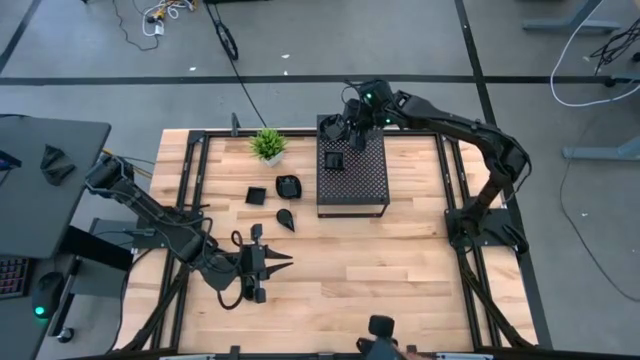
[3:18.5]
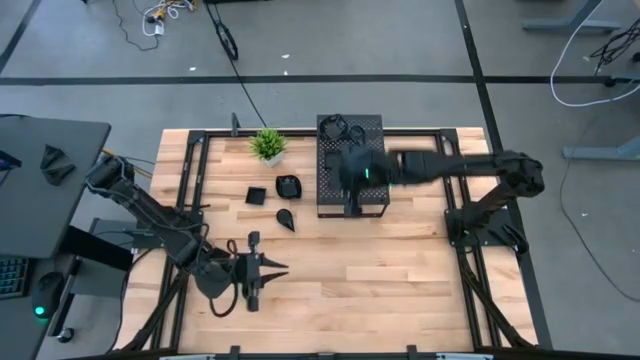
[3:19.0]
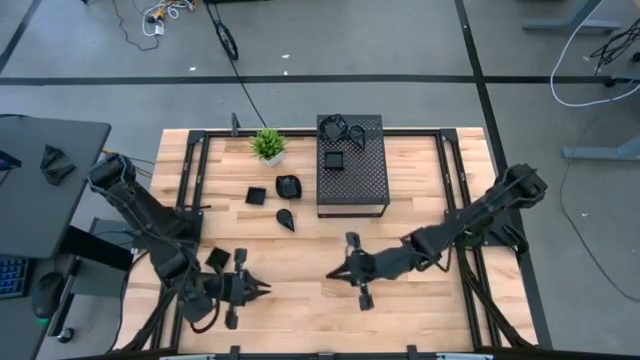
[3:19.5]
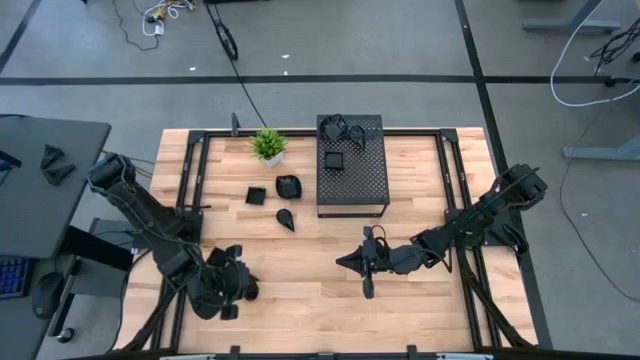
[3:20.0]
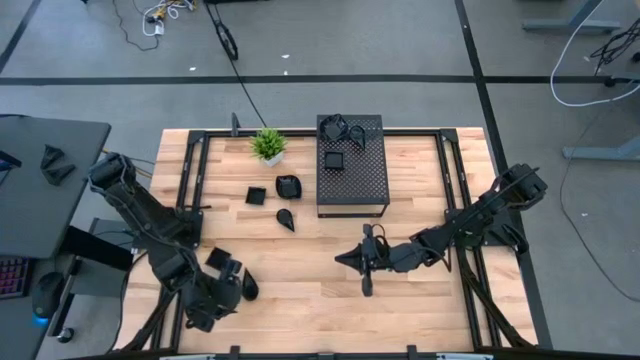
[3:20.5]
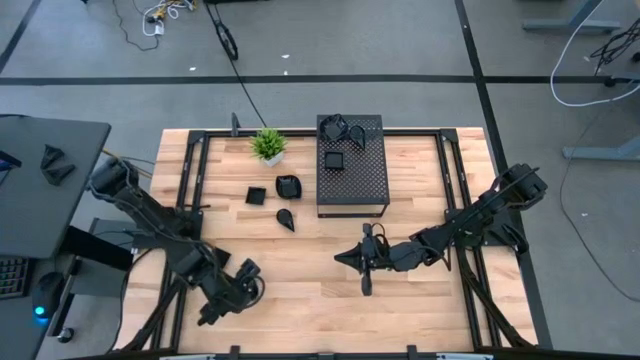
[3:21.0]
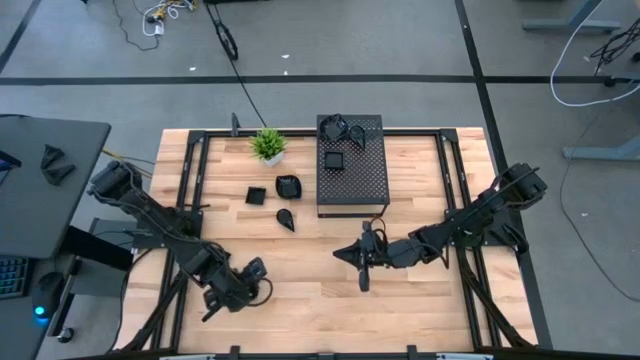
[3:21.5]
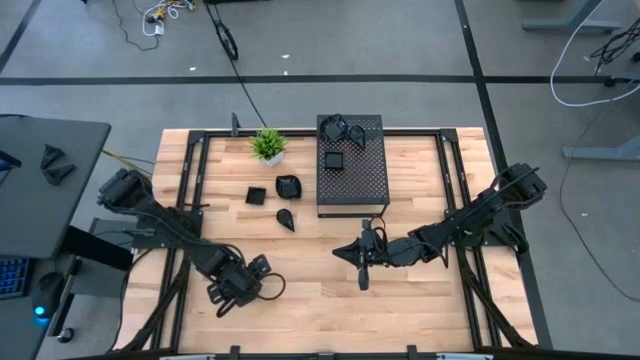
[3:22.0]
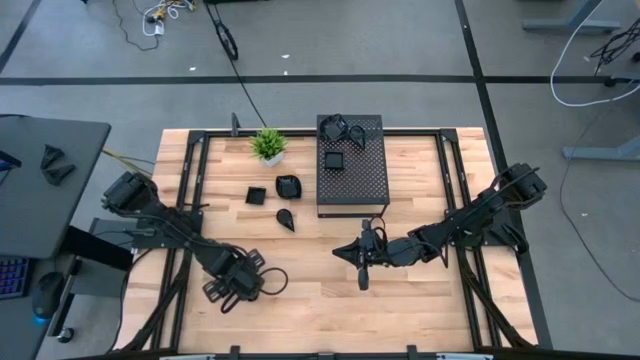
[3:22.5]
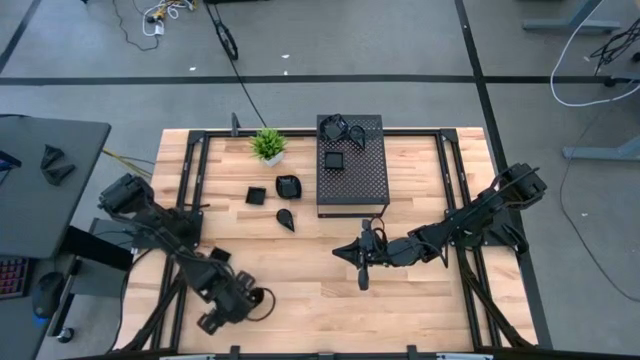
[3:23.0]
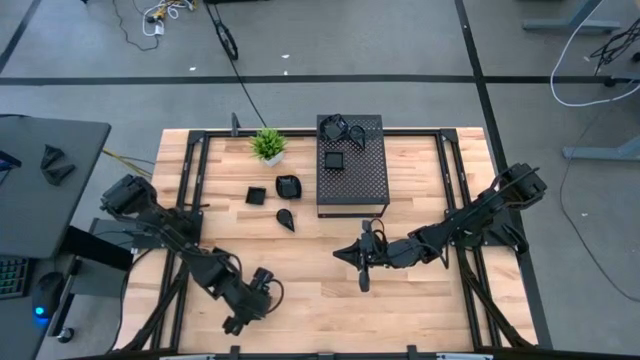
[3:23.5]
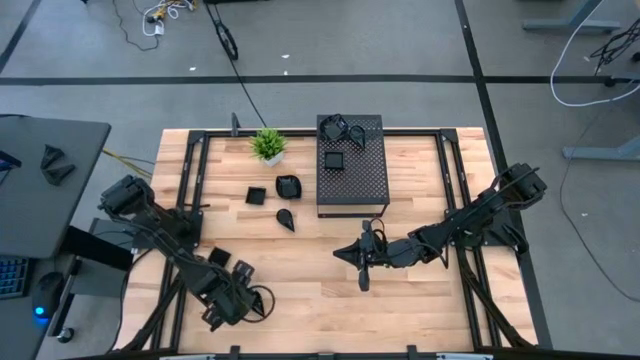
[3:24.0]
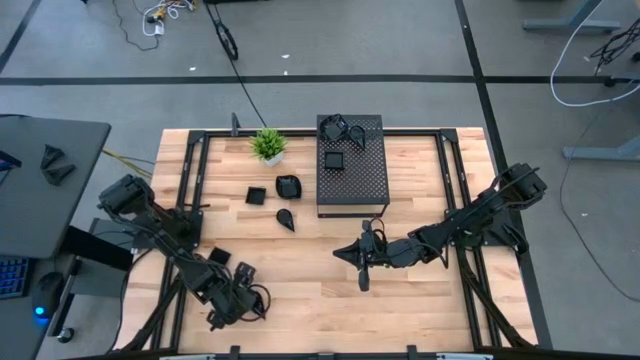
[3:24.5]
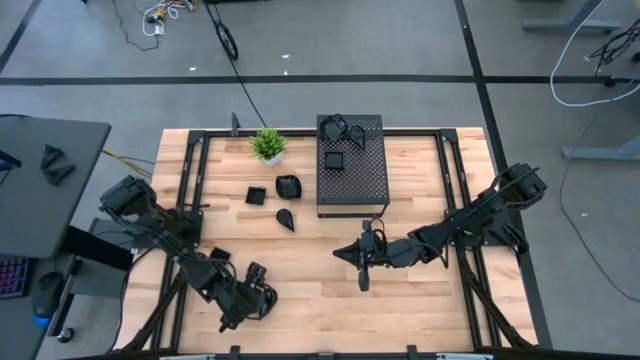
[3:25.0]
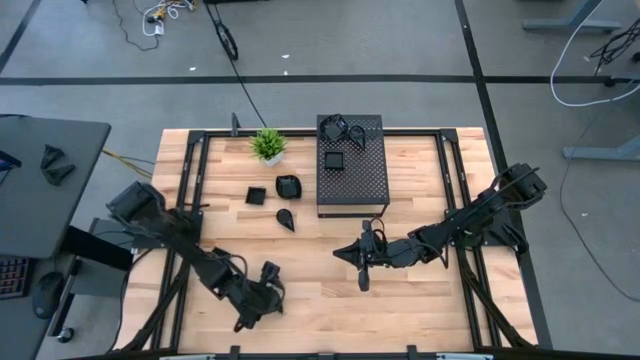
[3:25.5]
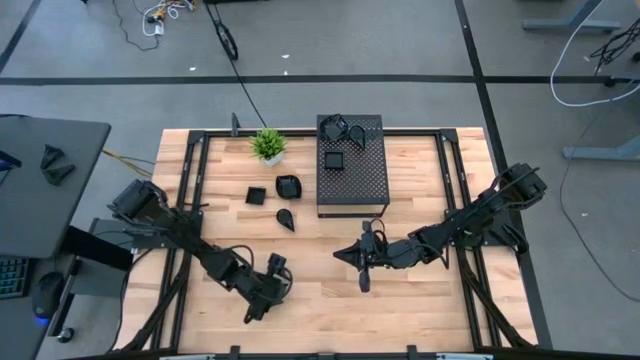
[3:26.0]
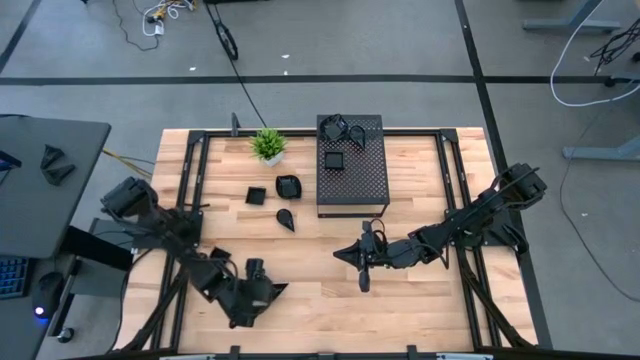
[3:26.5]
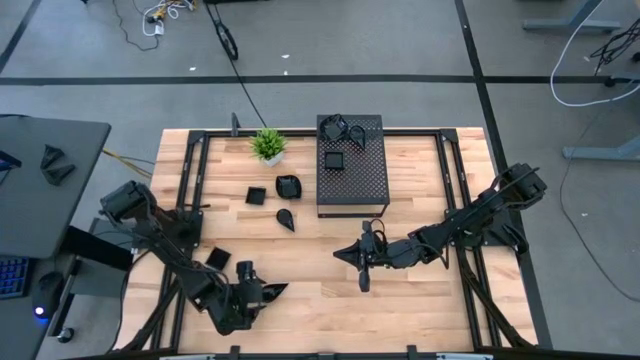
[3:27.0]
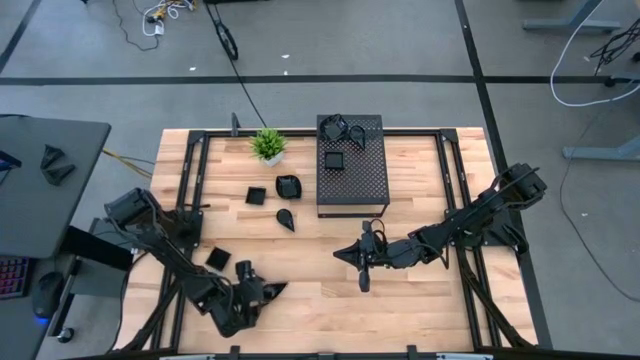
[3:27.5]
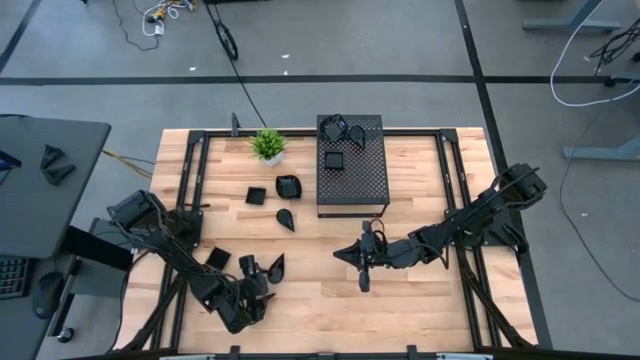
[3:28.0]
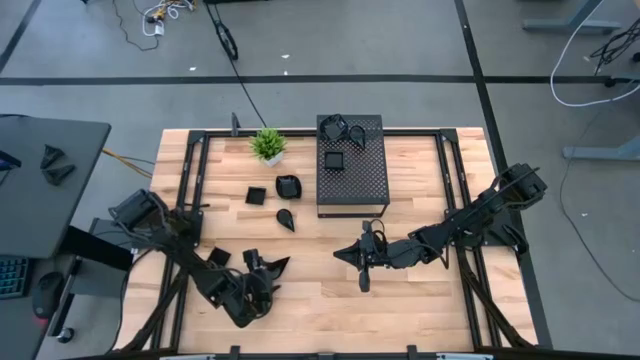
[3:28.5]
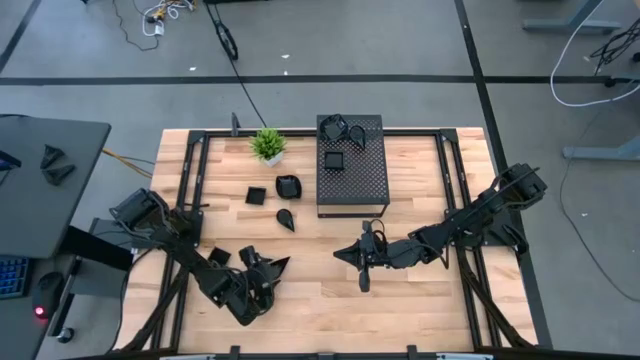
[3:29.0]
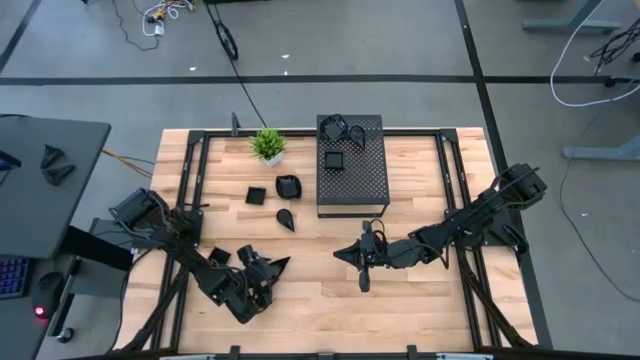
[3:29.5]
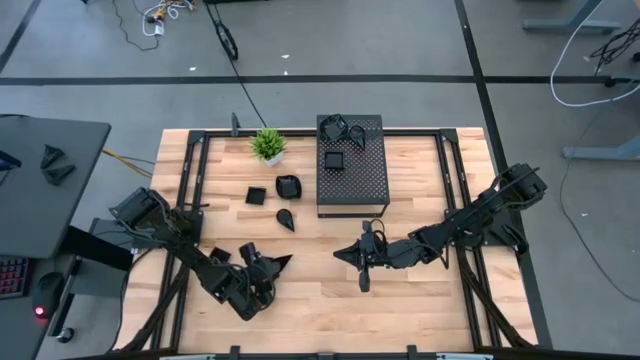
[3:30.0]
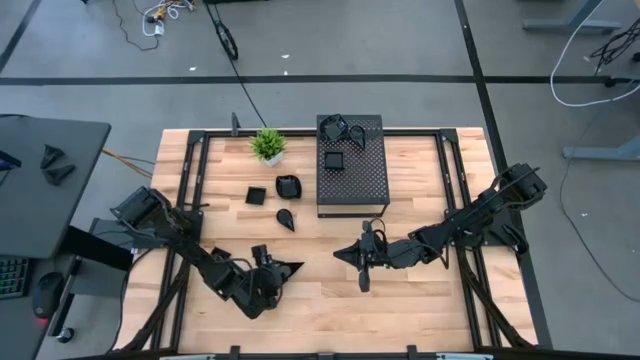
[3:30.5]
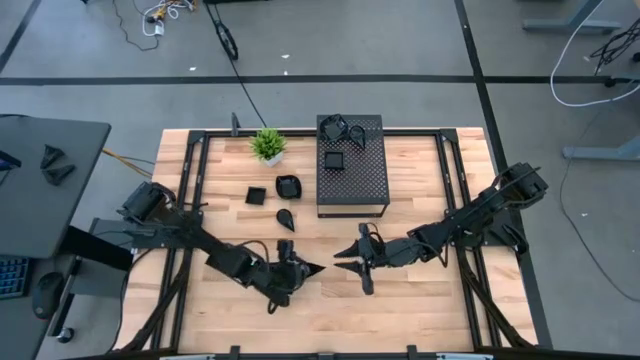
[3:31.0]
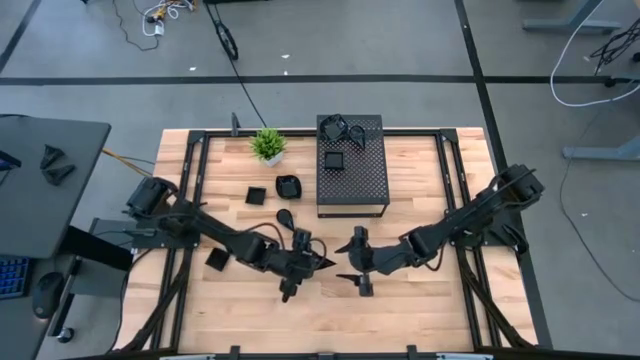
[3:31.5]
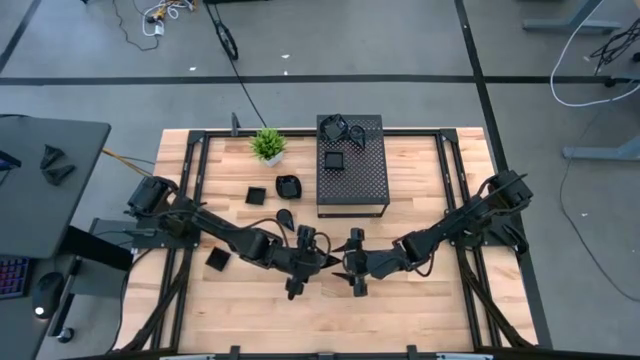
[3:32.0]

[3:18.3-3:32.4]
Task: Pick & Place Mini shaped plates
Stack the bottom drop shaped plate on top of the drop shaped plates on the shelf

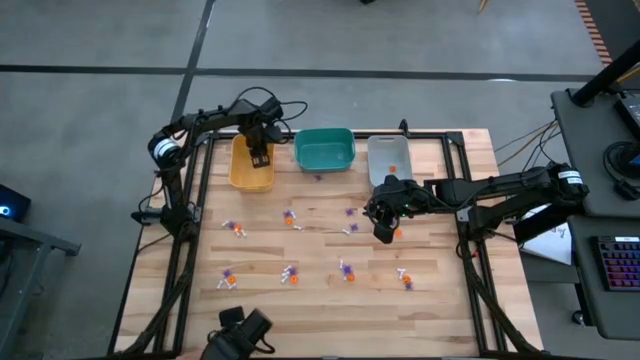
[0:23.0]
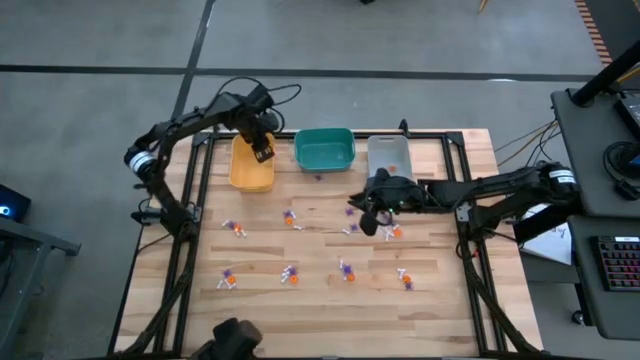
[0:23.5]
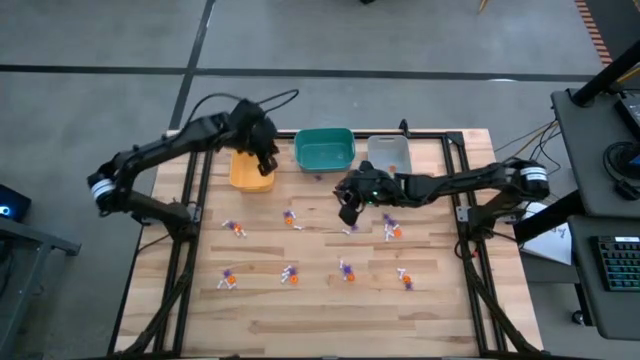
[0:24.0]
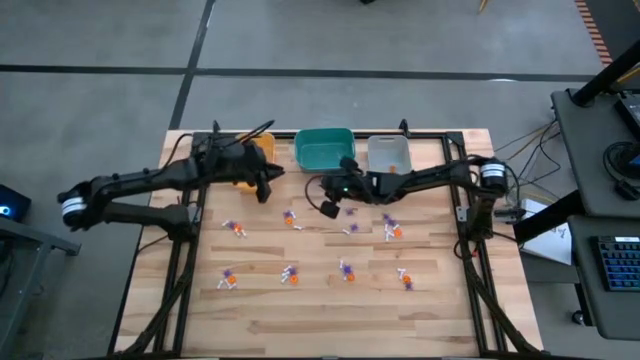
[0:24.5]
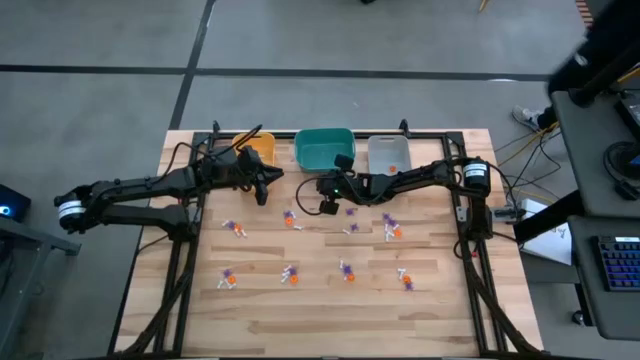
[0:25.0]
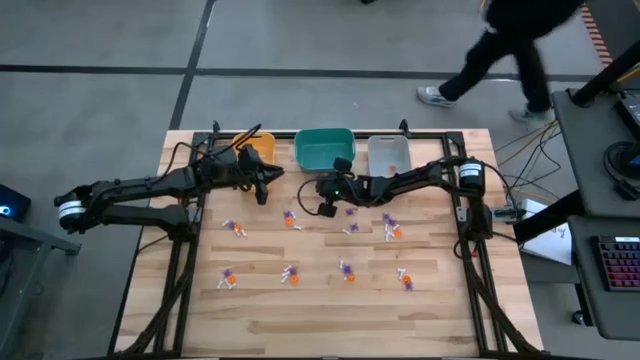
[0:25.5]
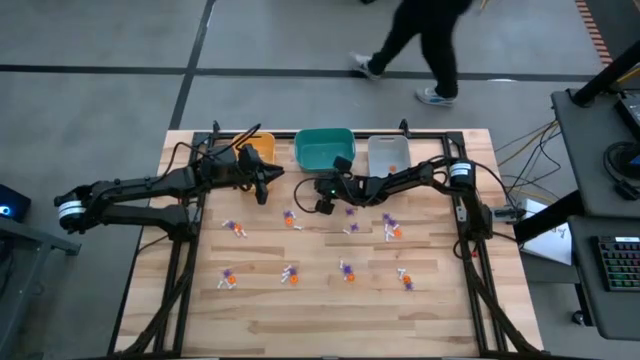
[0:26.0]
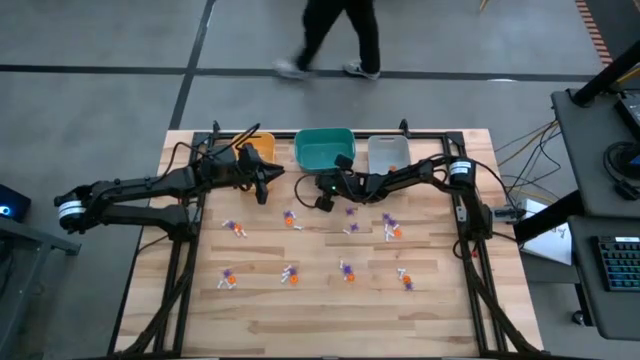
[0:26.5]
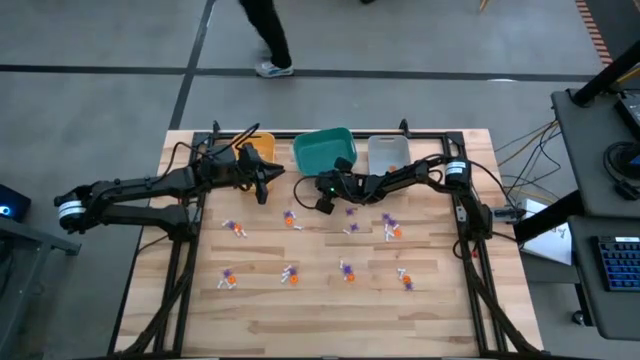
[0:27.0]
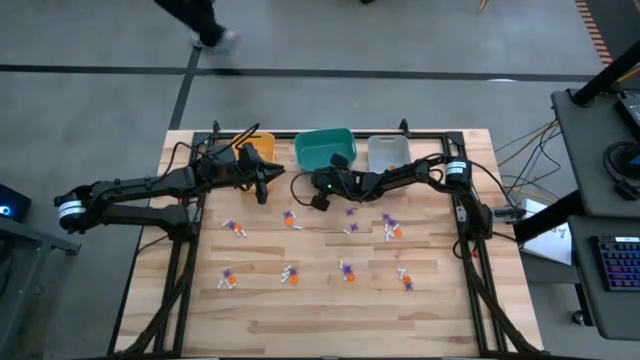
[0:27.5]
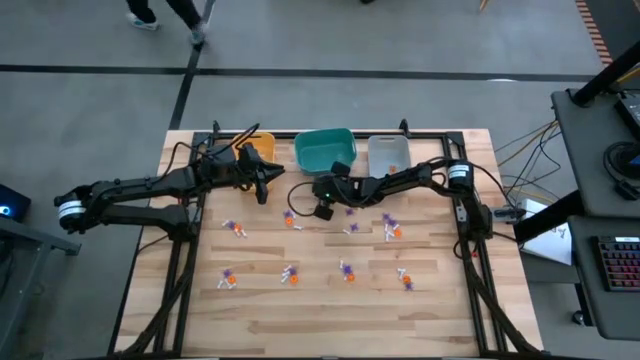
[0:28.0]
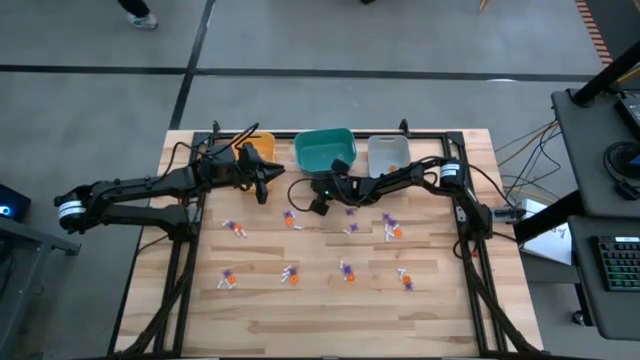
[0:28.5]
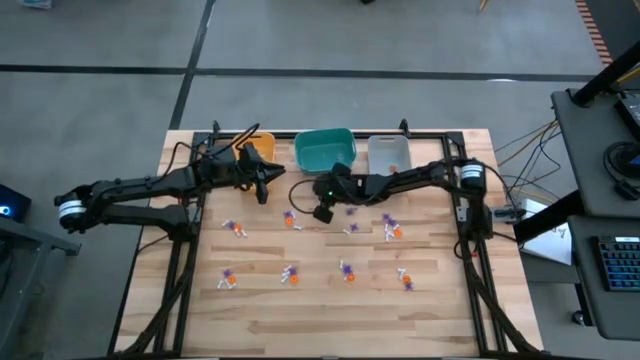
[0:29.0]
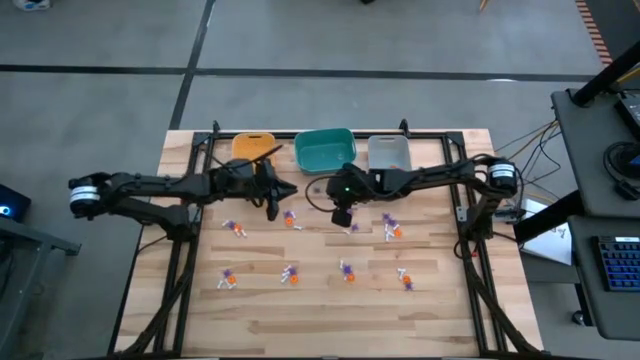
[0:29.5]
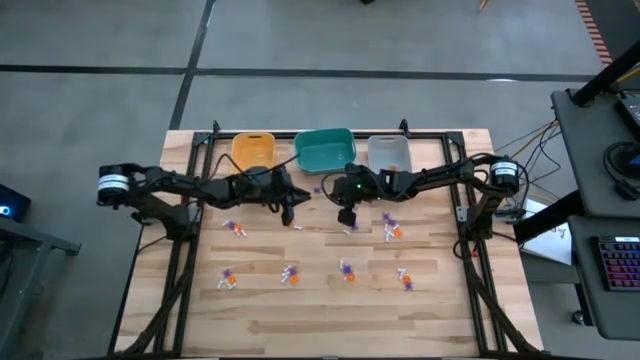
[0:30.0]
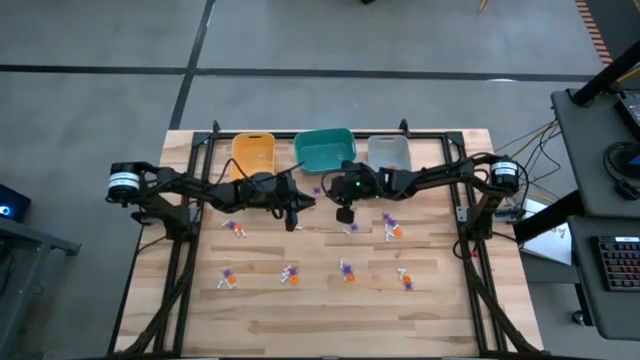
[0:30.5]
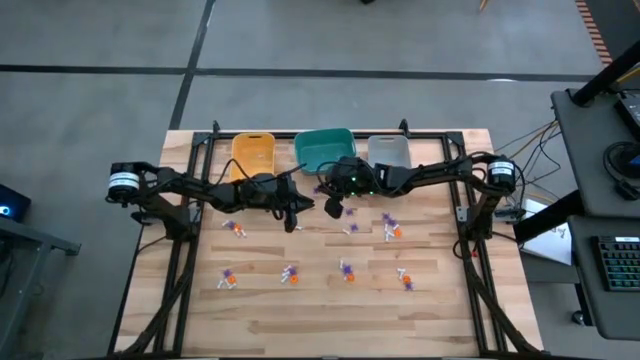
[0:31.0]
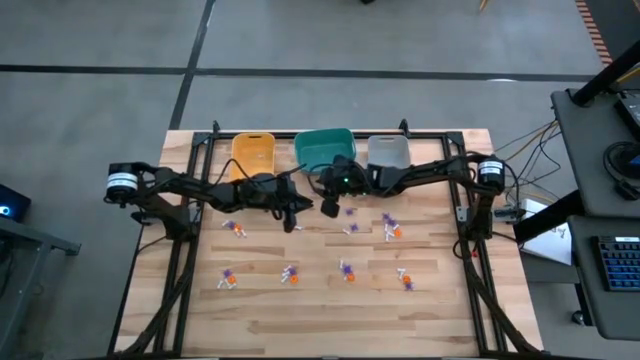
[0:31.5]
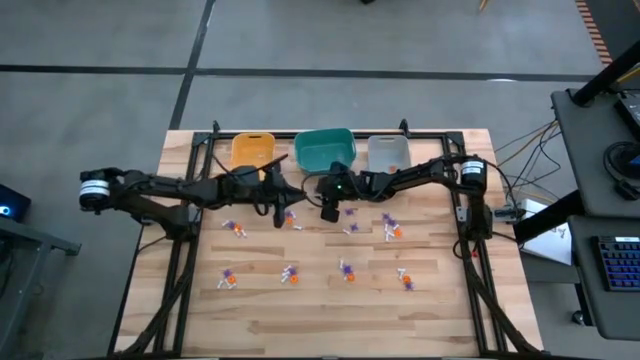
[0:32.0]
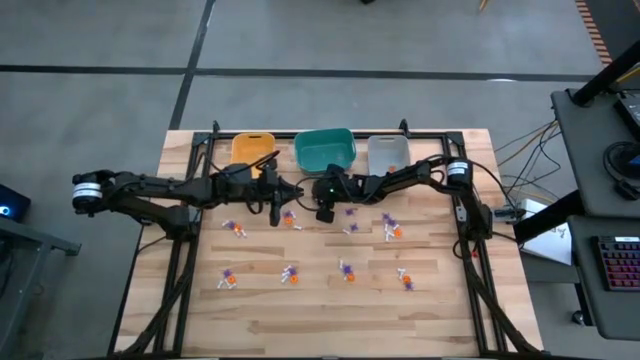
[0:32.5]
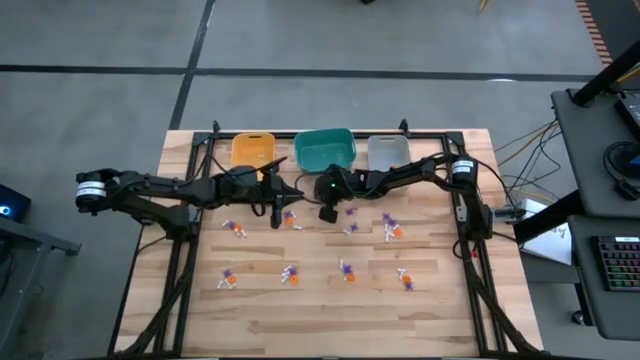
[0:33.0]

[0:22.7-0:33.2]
Task: Sort Halloween decoration
Put the violet spider toy into the green bin
